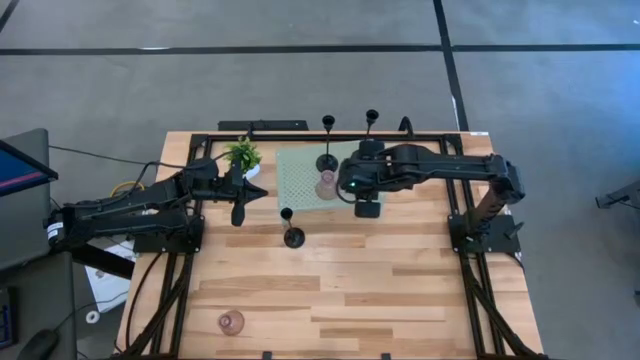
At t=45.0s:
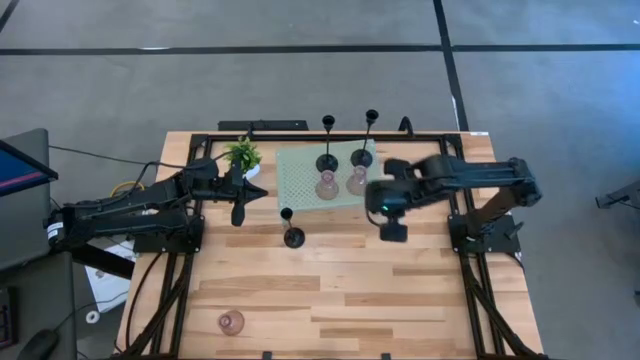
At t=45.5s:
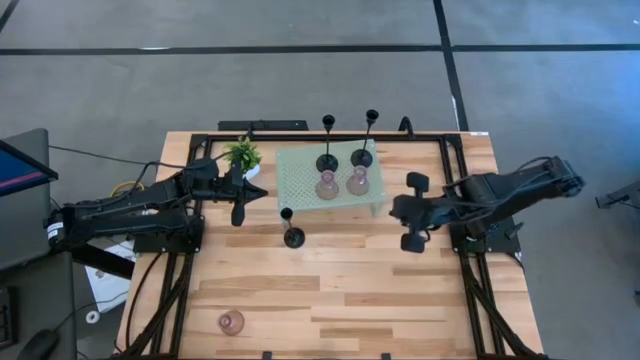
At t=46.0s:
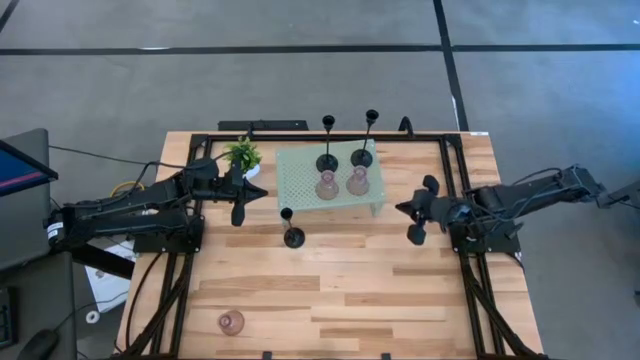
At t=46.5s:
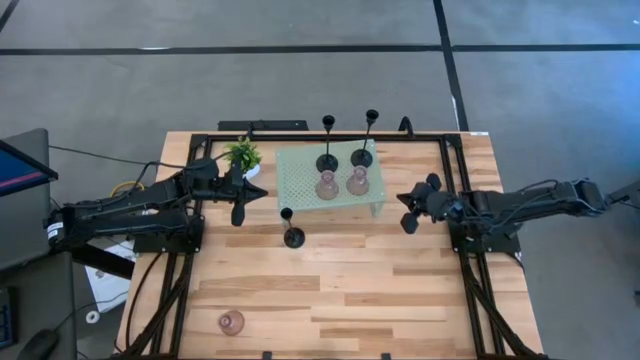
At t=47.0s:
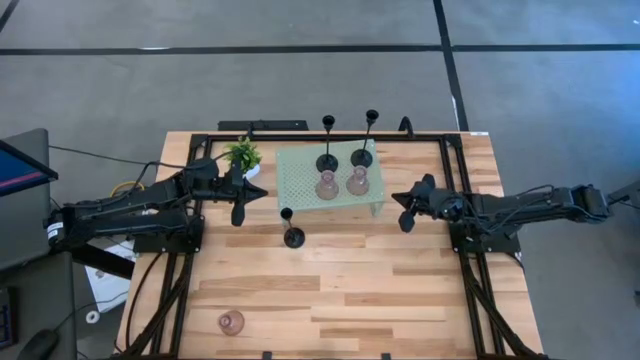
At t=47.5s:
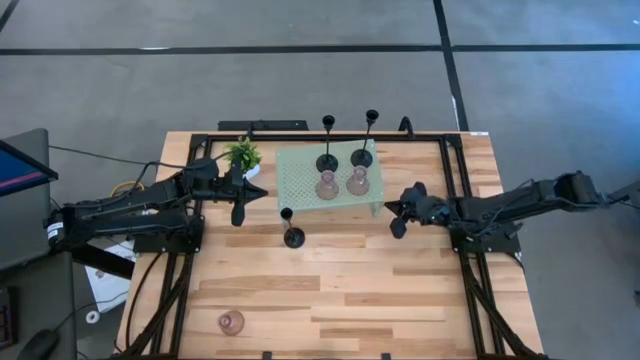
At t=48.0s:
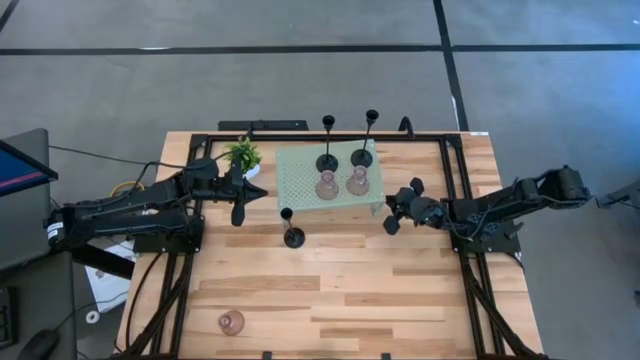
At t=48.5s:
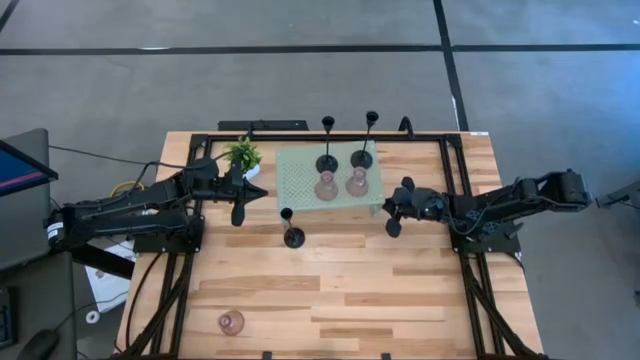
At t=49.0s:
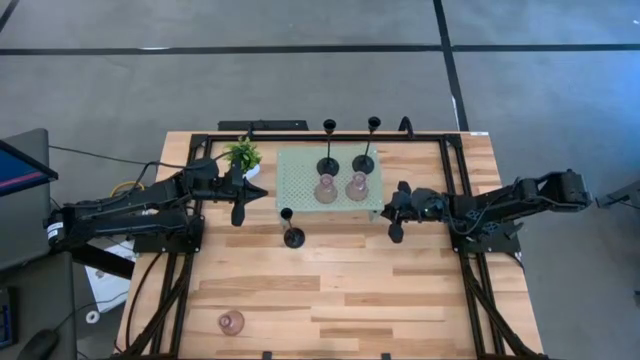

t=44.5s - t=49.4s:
Task: Pick & Place candle stick holders
Adjust the shelf

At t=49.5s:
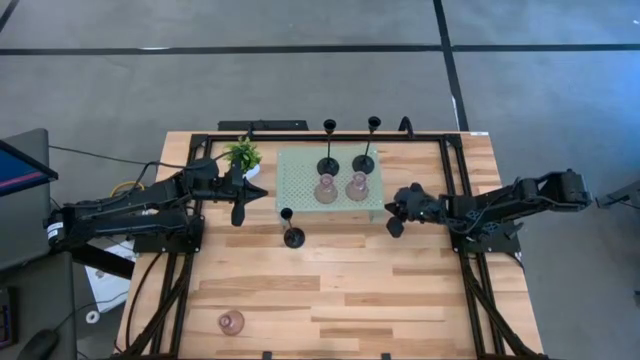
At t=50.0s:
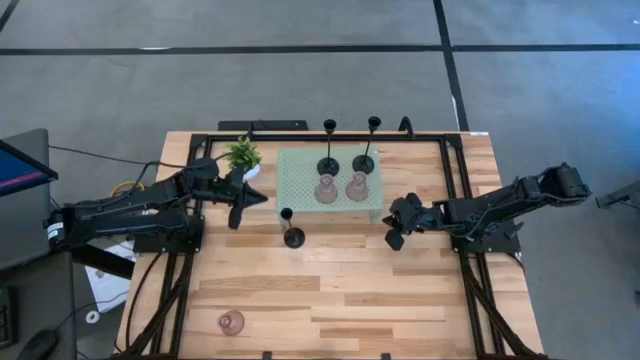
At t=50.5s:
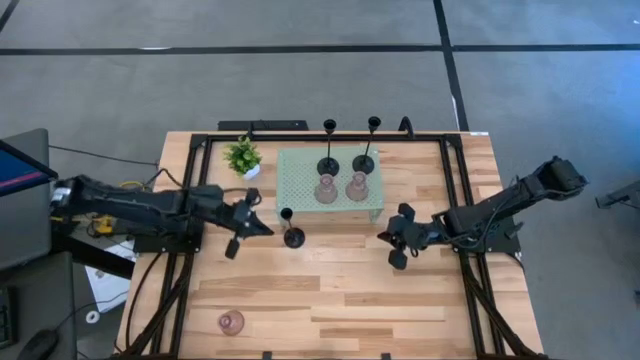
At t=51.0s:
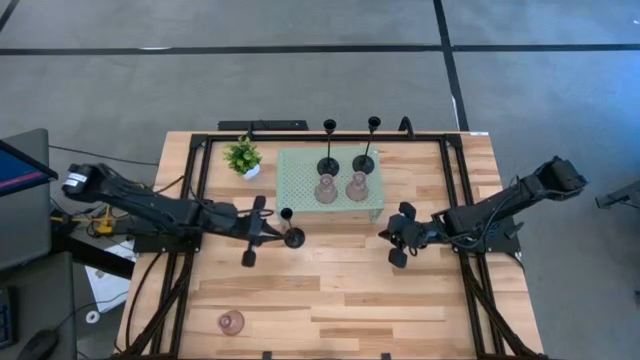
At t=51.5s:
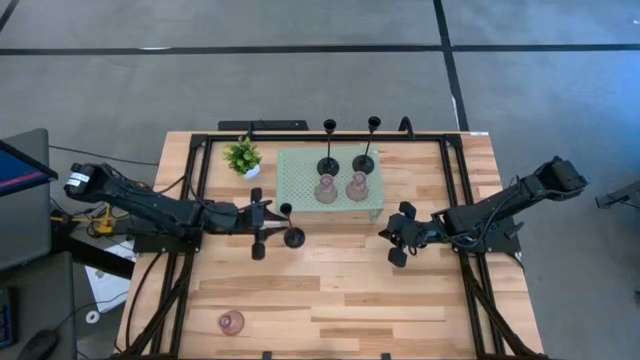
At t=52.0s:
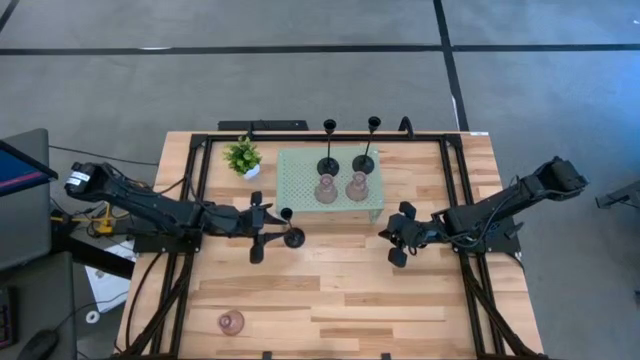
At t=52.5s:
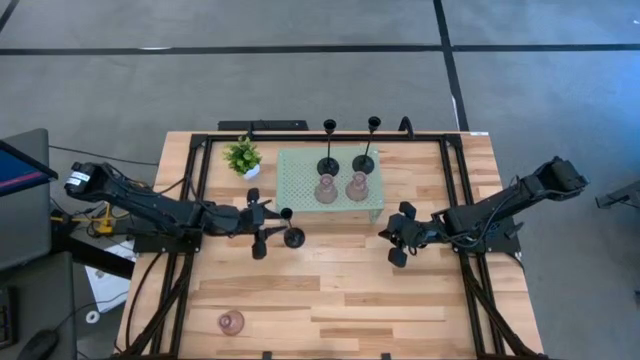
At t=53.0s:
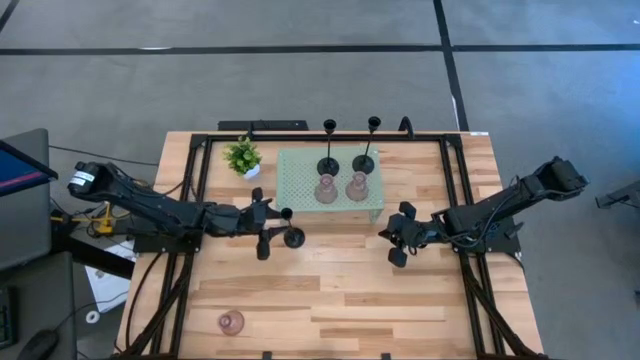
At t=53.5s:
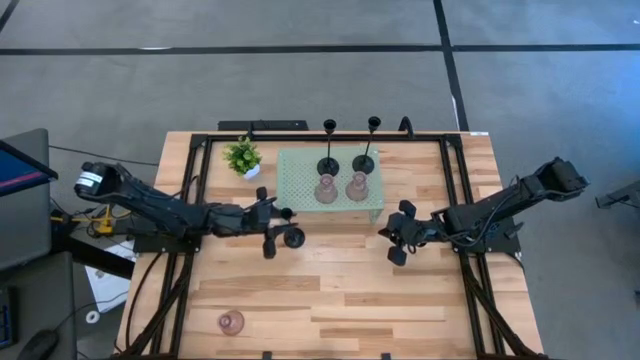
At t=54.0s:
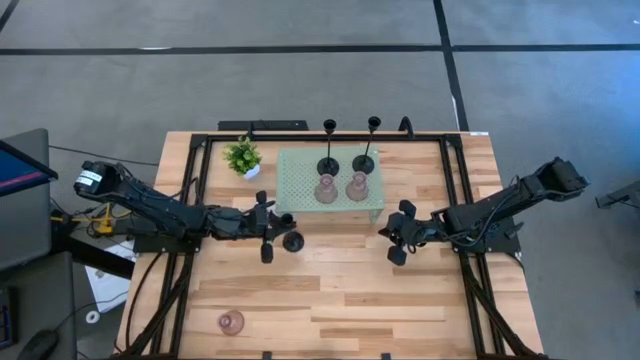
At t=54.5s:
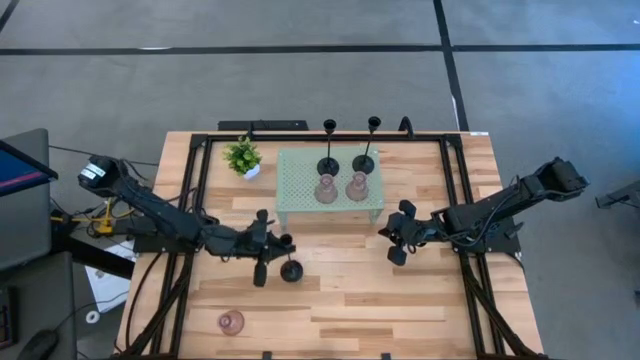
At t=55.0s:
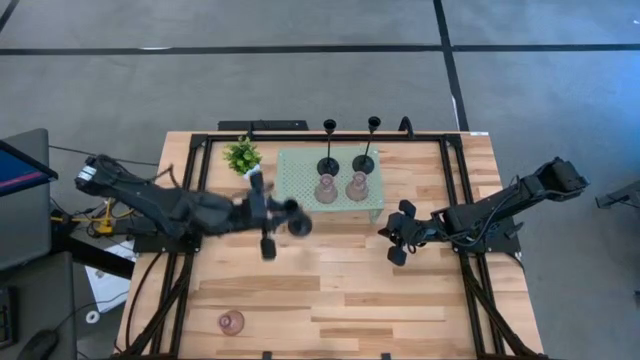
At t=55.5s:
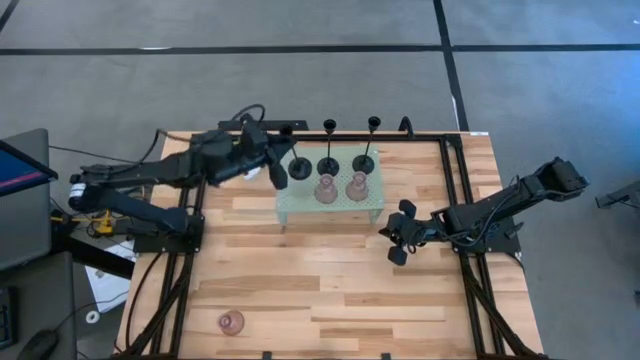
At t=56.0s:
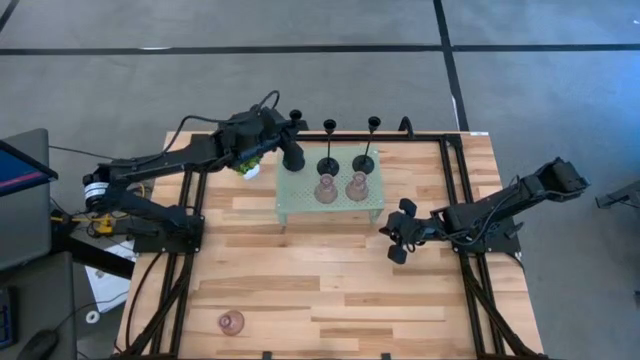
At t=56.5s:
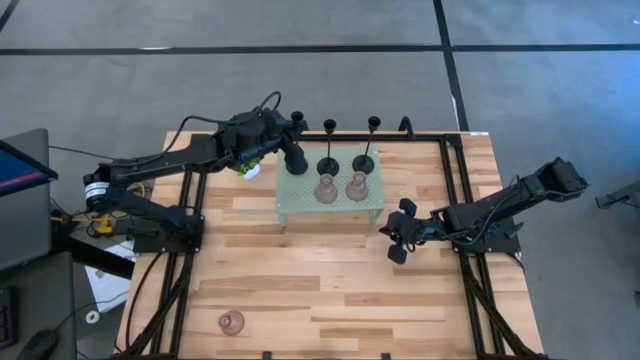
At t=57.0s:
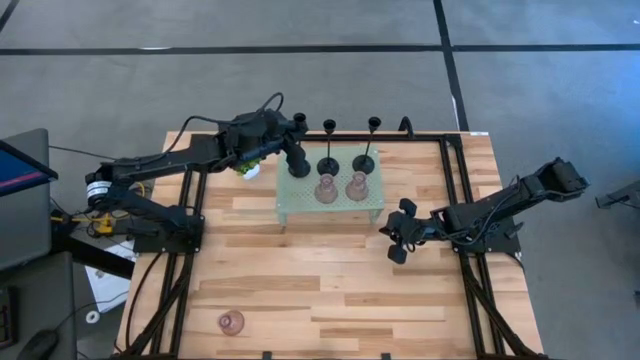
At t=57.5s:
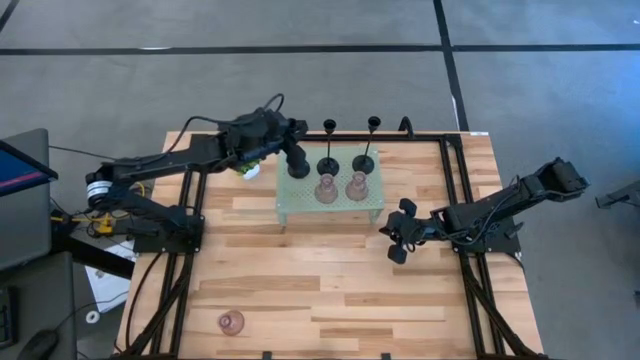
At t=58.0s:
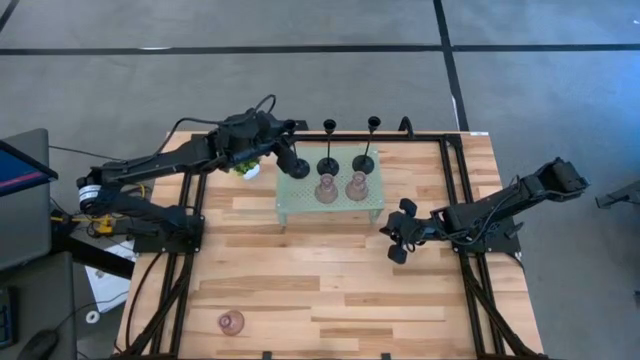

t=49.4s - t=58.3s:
Put the black candle holder on the shelf

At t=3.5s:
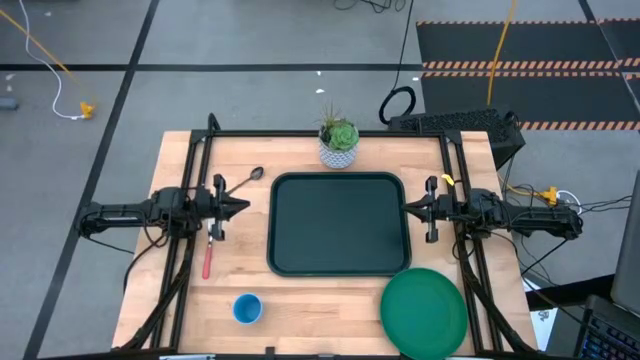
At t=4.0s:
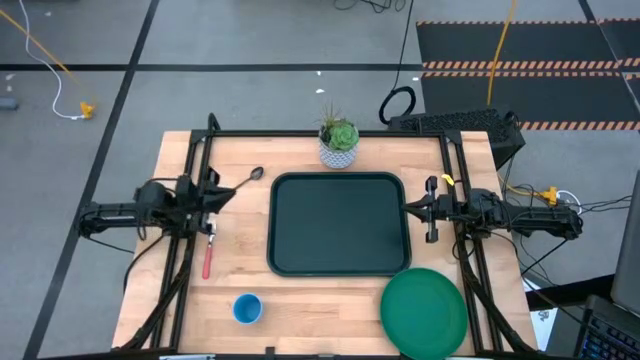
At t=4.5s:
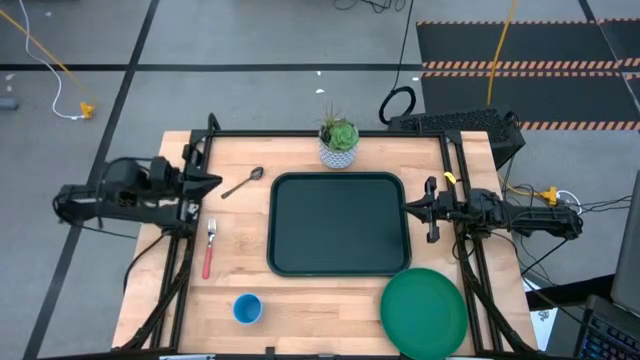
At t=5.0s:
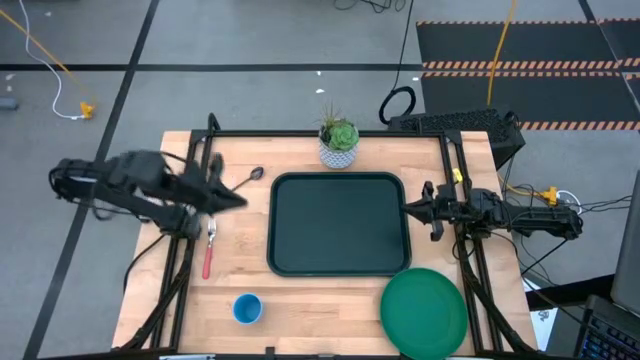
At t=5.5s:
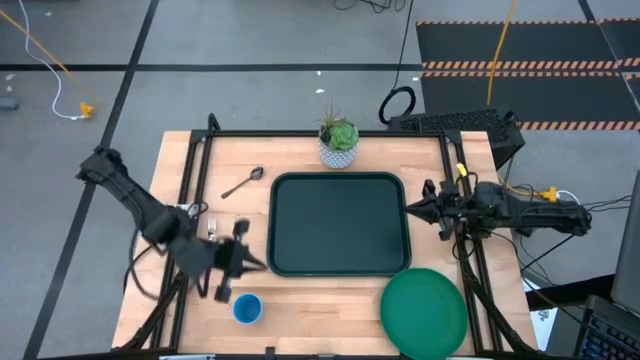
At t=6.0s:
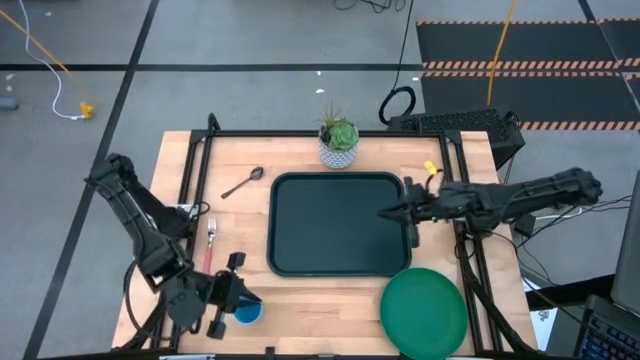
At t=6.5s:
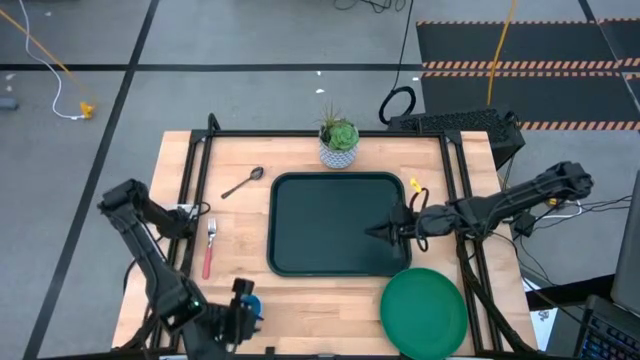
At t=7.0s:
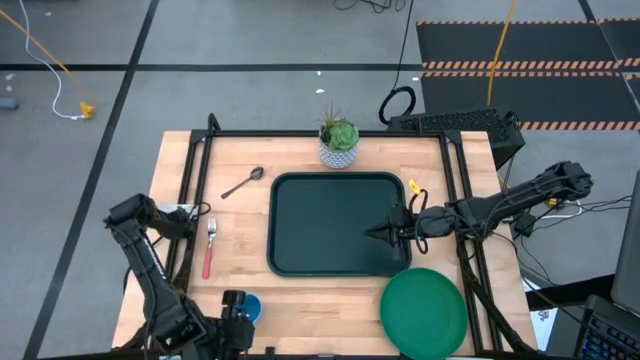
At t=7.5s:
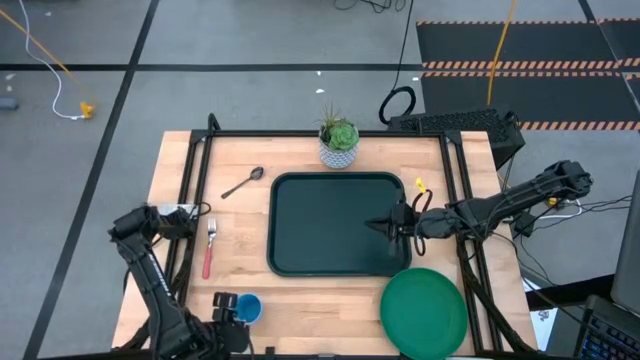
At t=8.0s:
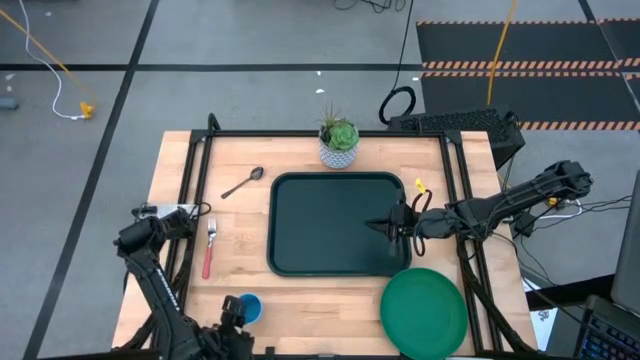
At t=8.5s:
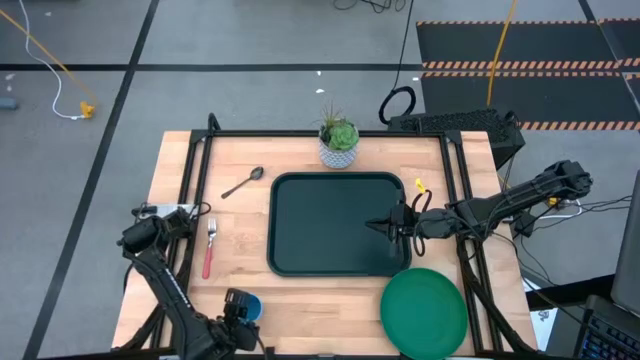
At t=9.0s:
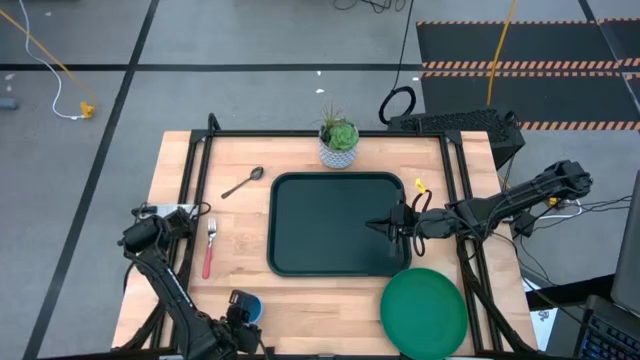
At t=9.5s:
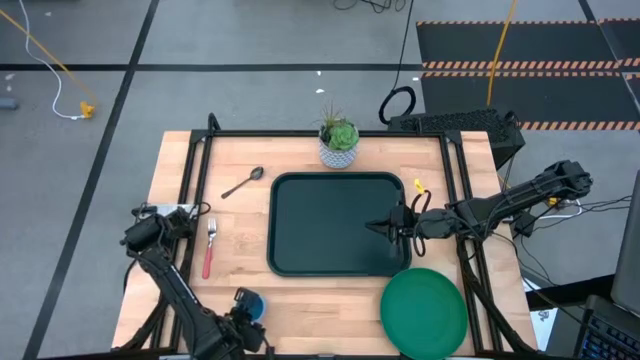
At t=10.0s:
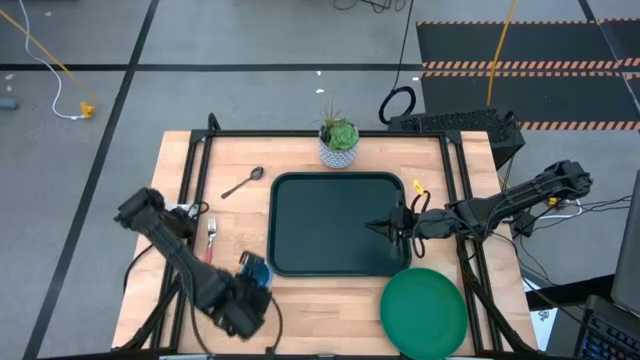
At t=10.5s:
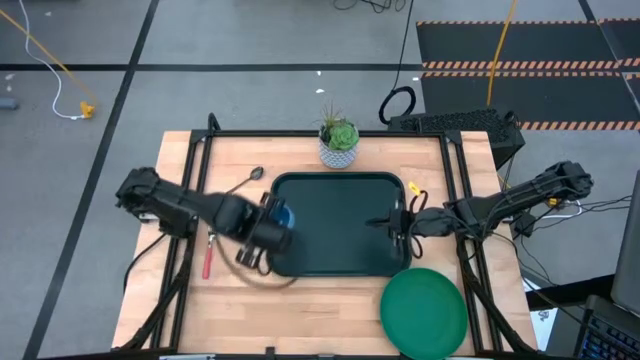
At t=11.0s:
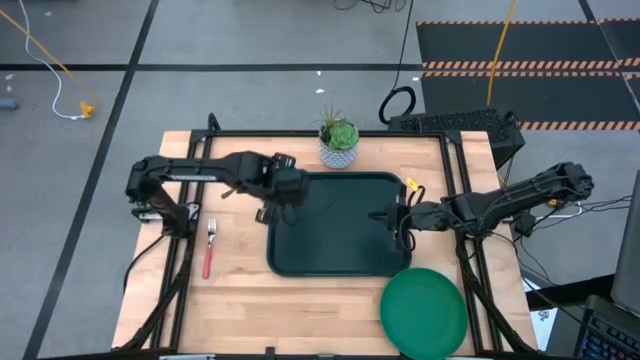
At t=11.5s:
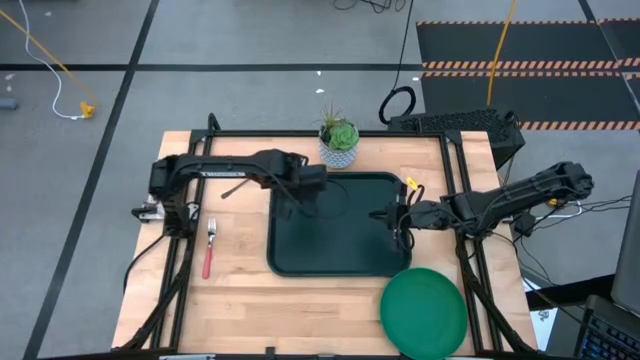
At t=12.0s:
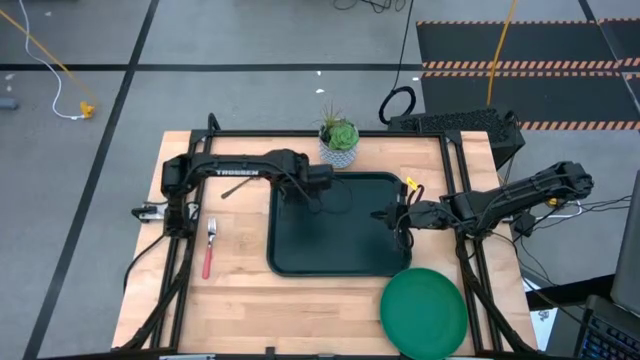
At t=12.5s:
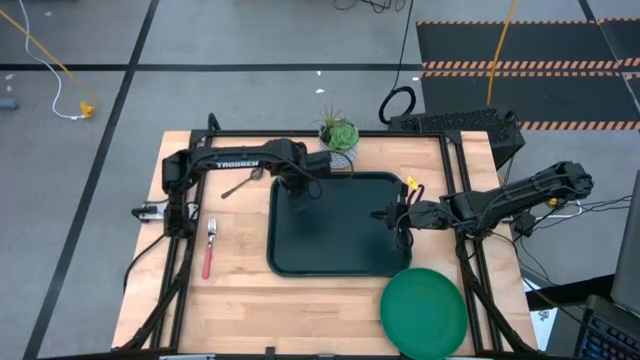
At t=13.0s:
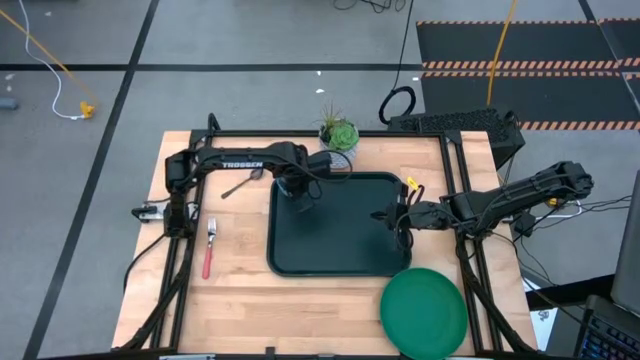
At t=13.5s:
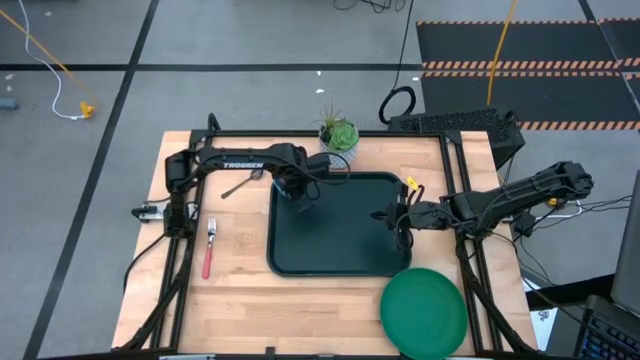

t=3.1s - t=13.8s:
Task: Pick and place plate/cup/fork/spoon on tray
Put the blue cup on the black serving tray
